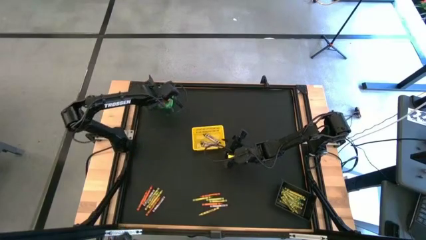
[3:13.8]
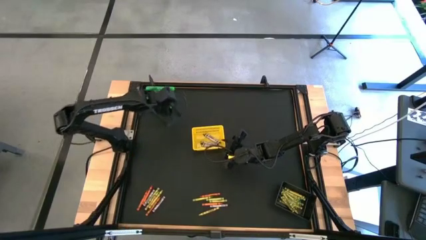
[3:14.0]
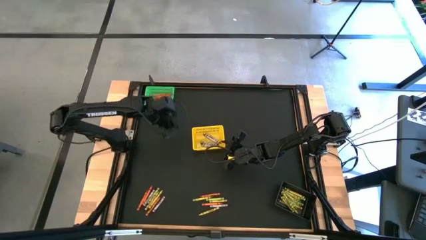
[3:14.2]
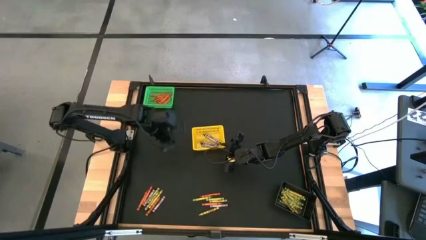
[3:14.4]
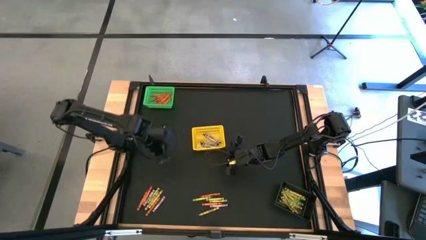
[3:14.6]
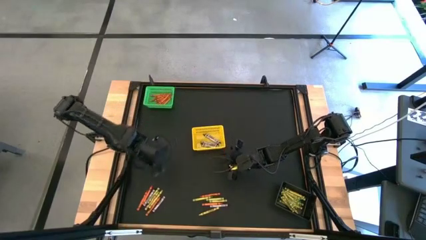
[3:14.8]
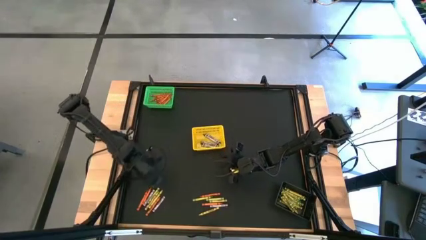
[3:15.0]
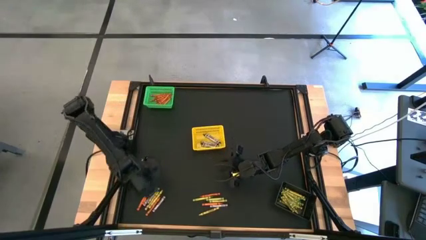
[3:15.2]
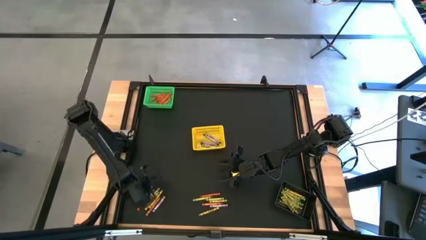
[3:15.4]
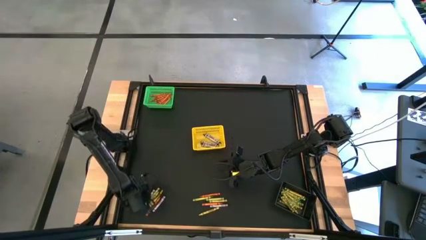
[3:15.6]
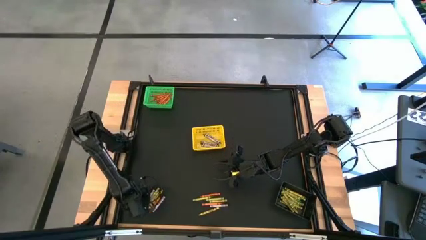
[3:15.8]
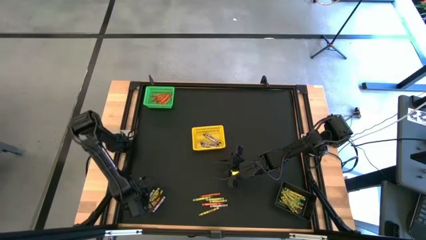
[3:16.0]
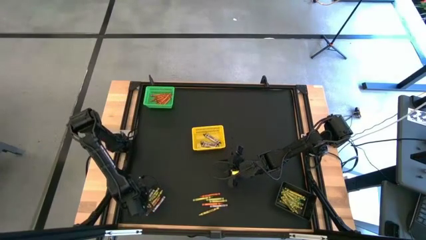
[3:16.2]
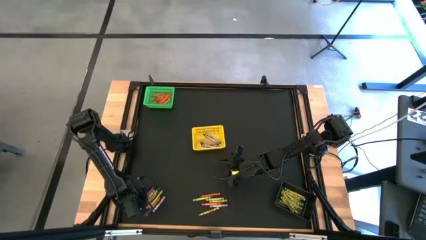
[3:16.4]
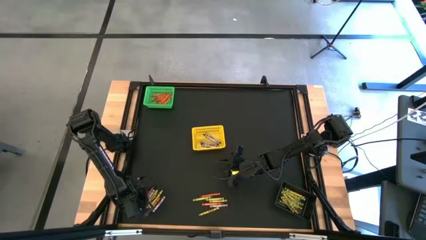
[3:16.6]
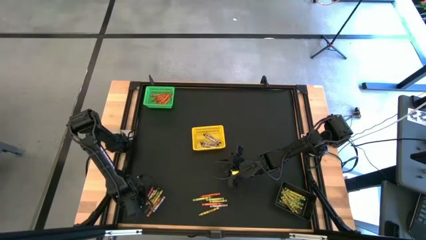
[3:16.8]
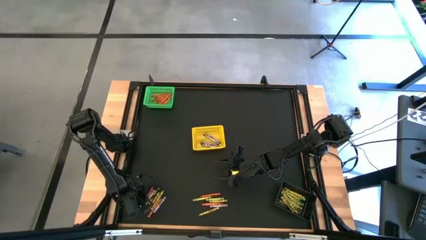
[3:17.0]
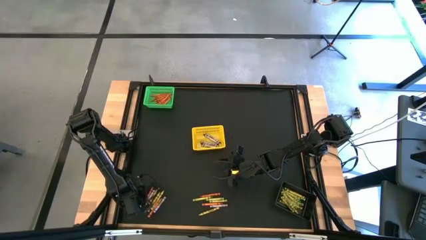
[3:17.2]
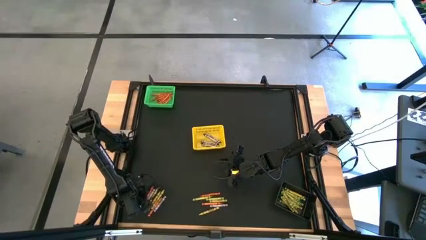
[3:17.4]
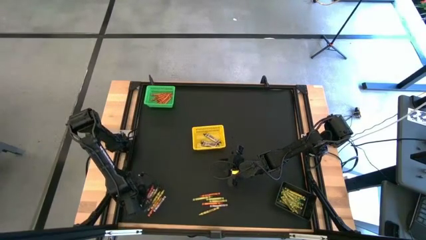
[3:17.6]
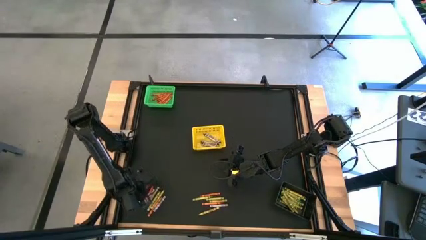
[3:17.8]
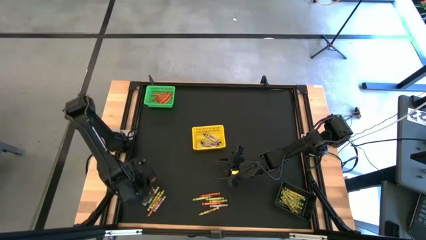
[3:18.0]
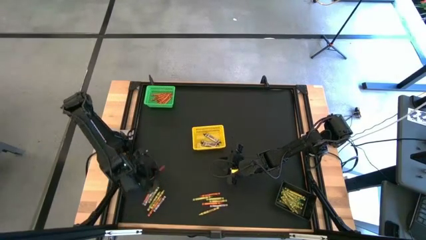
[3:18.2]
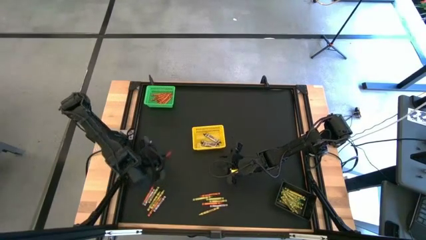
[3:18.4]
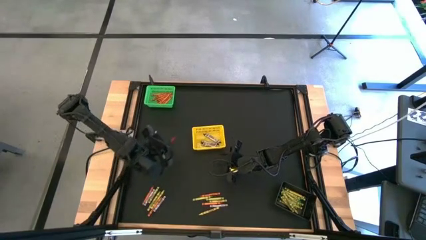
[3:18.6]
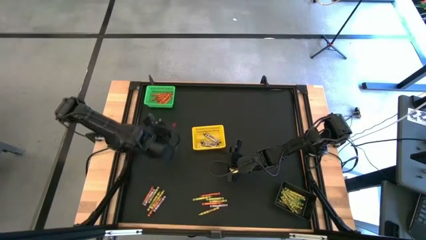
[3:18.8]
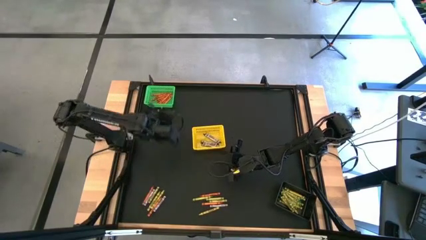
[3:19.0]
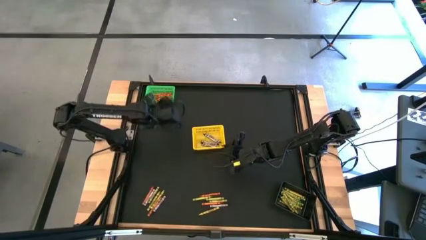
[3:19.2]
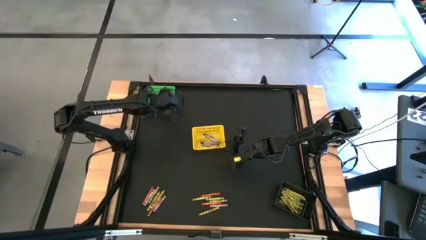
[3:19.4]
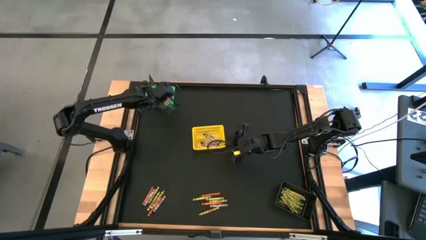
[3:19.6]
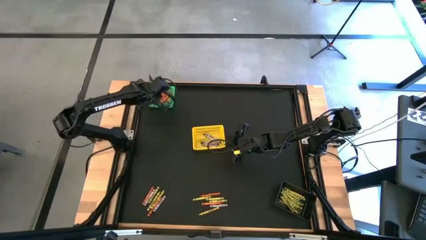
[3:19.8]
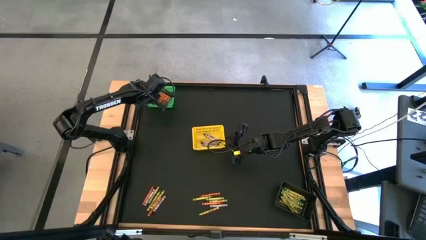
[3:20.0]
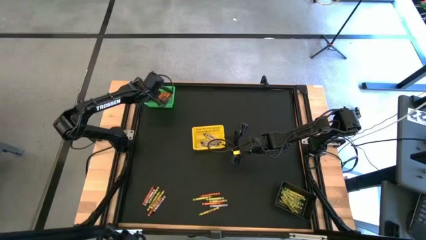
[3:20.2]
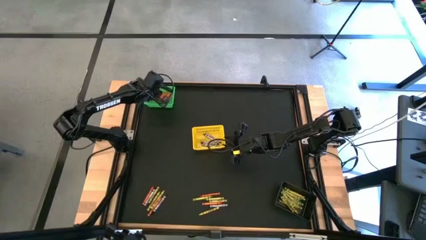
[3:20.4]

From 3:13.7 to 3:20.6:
Task: Sort crayons
Put the orange crayon into the green bin

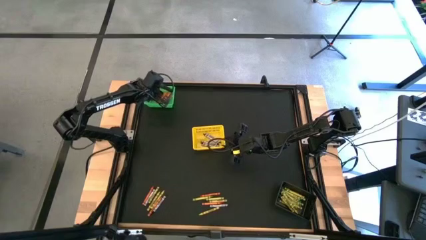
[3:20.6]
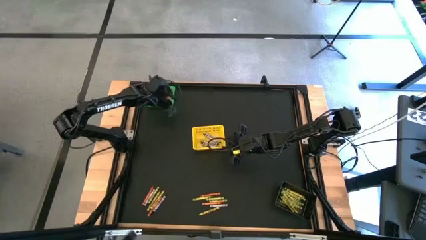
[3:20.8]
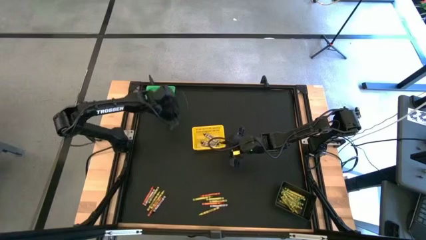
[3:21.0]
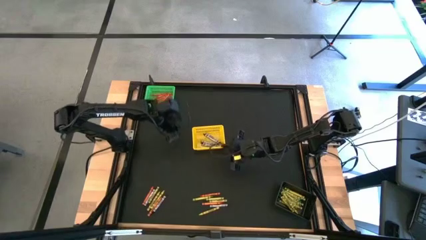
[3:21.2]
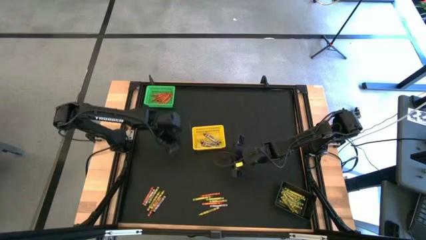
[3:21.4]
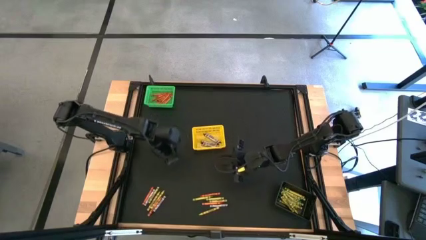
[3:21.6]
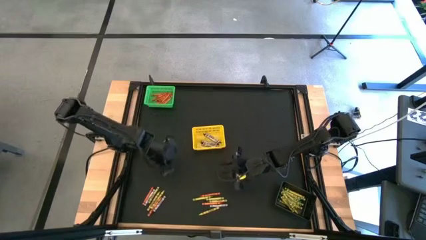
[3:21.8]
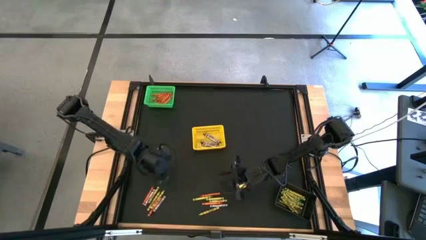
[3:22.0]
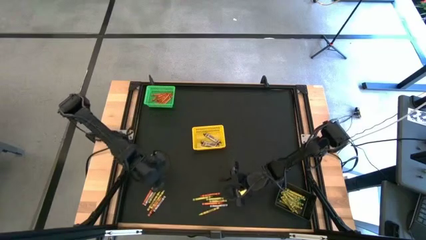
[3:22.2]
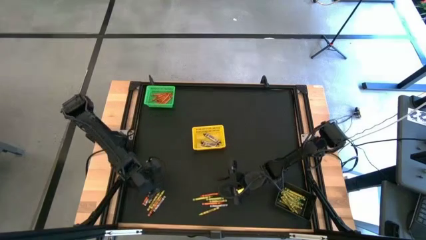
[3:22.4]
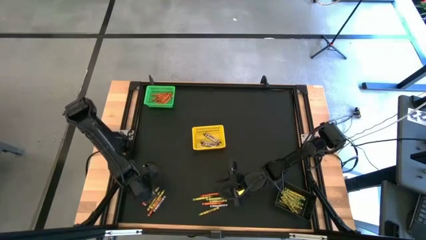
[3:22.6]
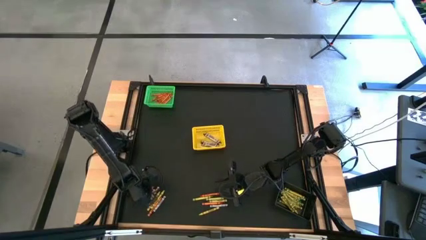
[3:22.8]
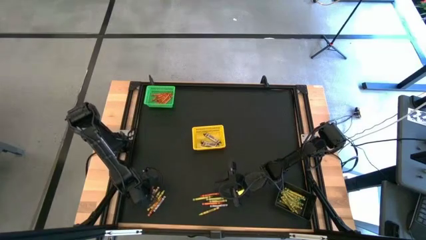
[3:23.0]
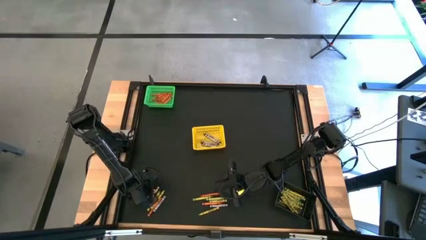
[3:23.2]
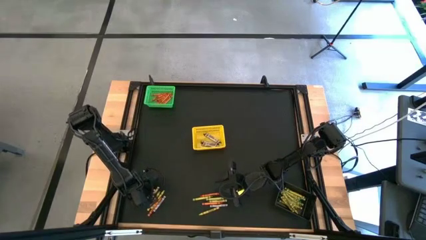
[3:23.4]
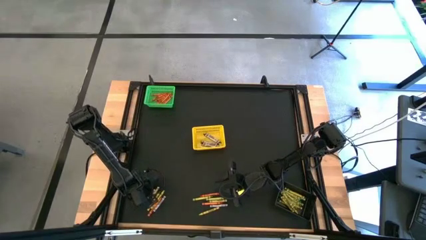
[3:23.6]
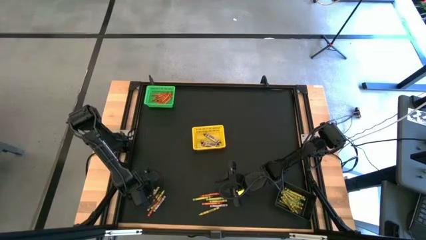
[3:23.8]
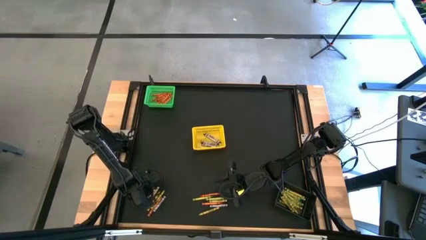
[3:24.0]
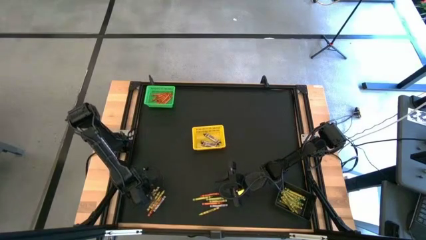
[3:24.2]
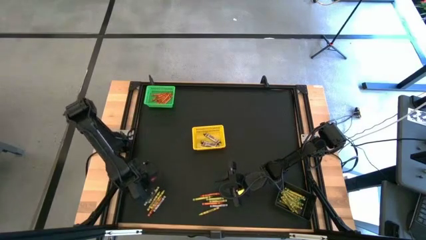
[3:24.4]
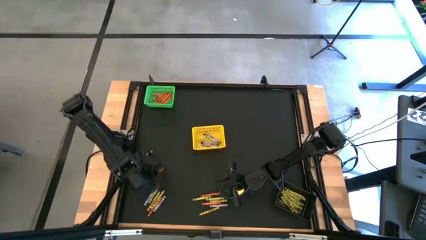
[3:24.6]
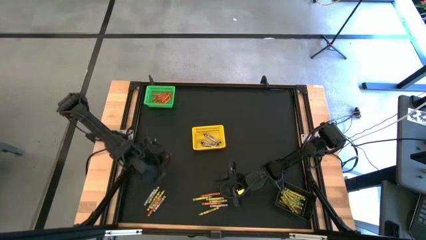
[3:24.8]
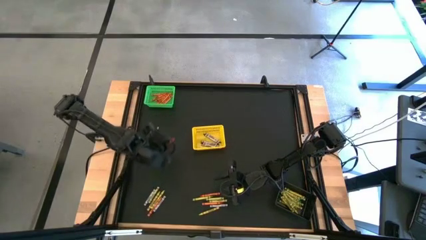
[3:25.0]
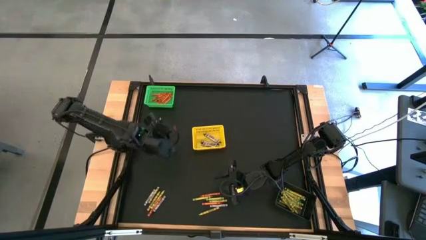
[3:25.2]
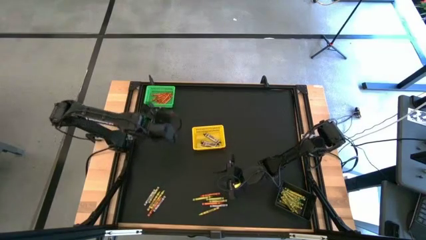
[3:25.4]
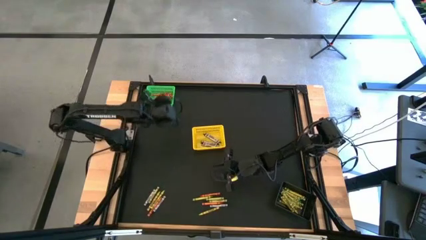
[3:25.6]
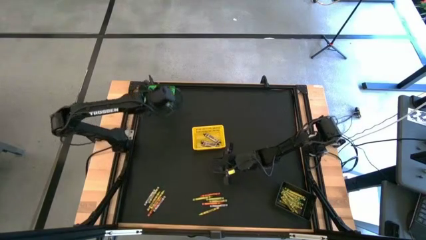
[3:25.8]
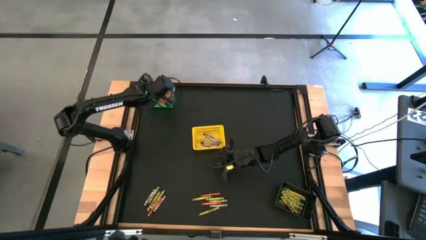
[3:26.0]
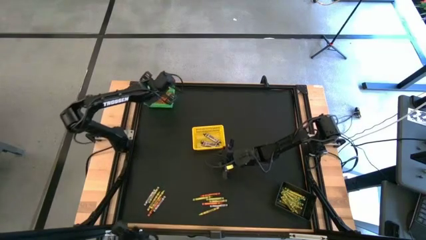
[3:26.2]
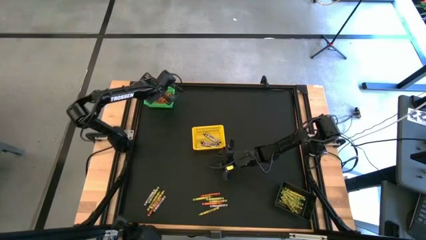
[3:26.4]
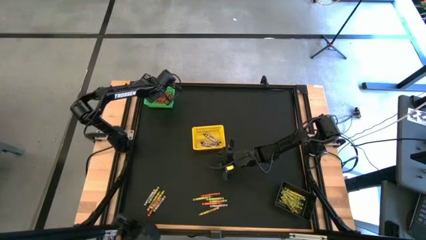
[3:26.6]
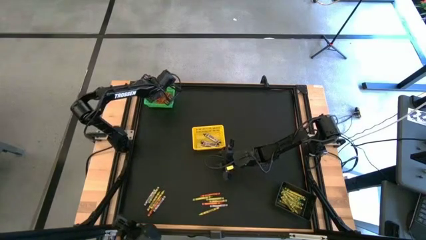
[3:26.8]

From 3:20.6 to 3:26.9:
Put the orange crayon into the green bin
